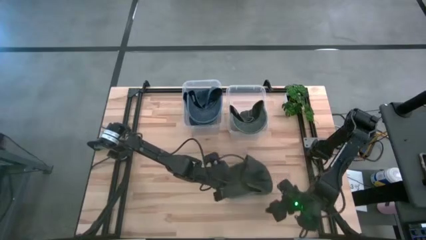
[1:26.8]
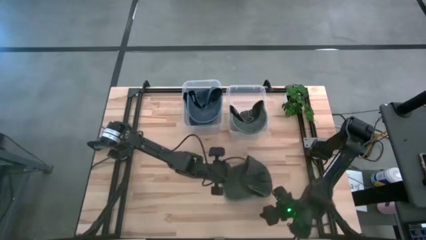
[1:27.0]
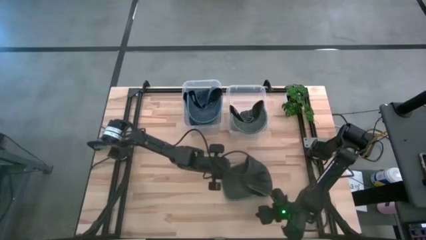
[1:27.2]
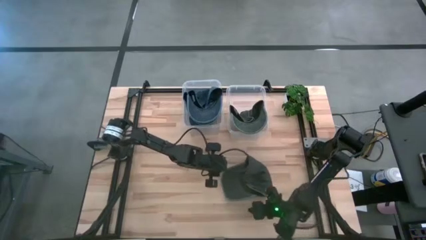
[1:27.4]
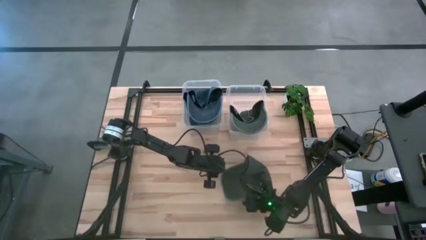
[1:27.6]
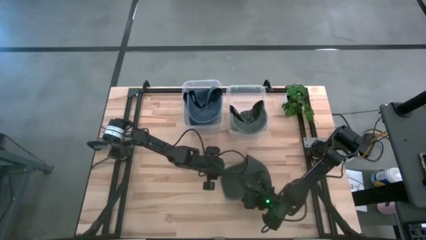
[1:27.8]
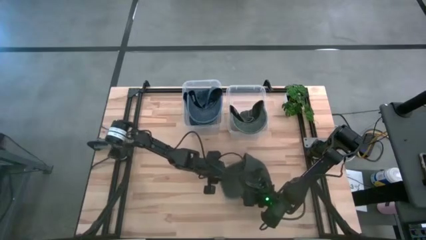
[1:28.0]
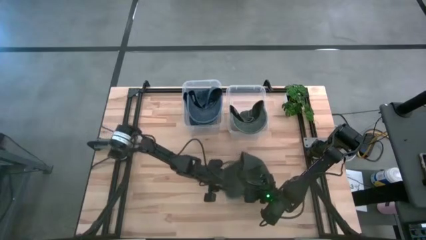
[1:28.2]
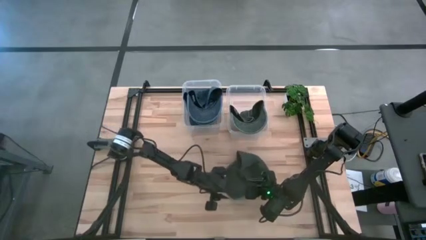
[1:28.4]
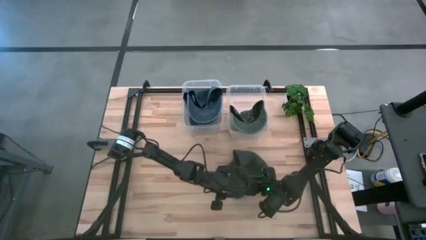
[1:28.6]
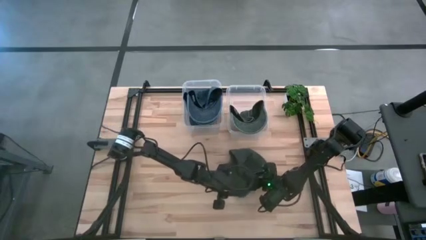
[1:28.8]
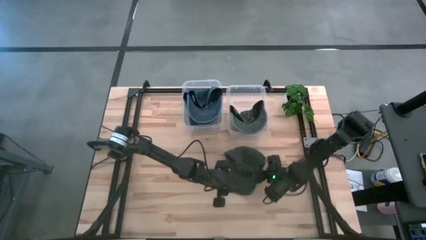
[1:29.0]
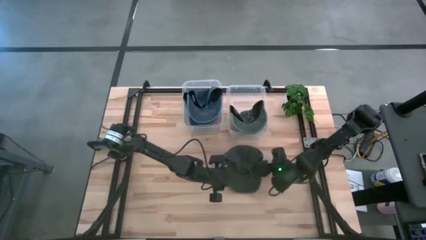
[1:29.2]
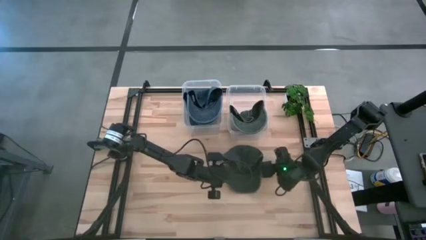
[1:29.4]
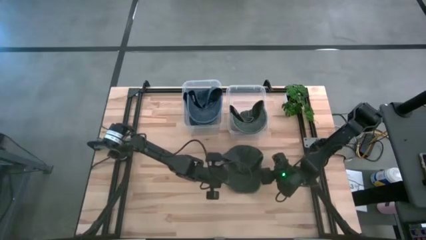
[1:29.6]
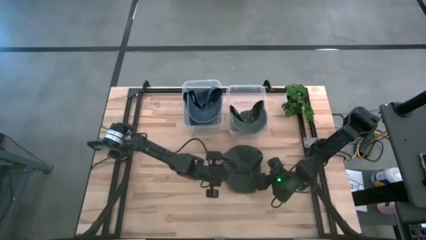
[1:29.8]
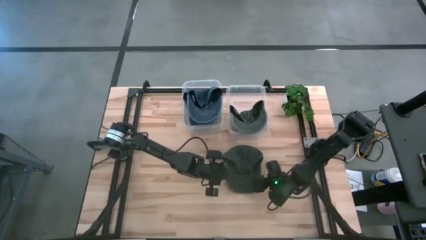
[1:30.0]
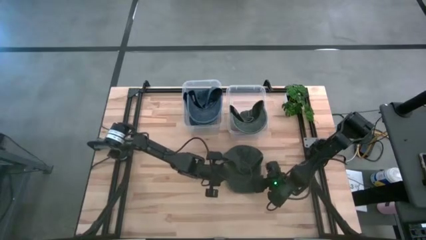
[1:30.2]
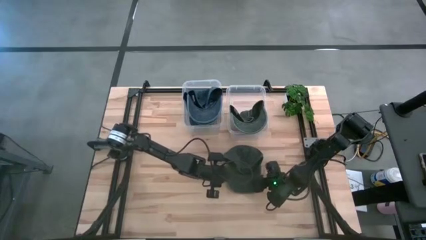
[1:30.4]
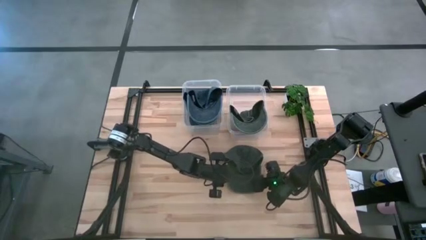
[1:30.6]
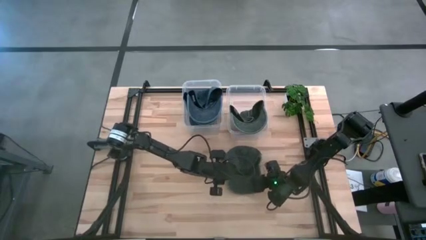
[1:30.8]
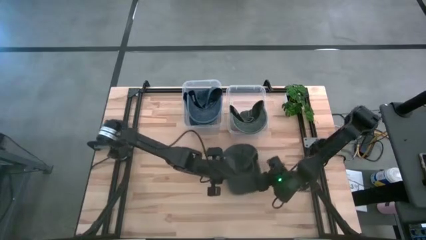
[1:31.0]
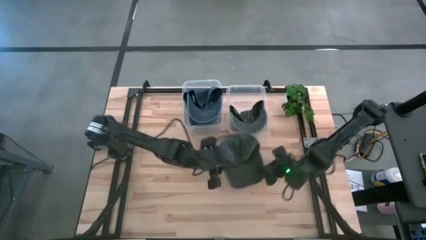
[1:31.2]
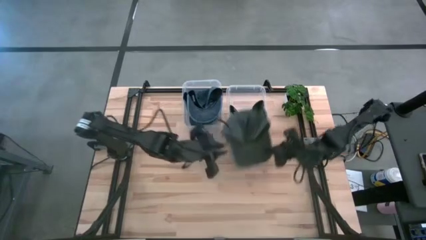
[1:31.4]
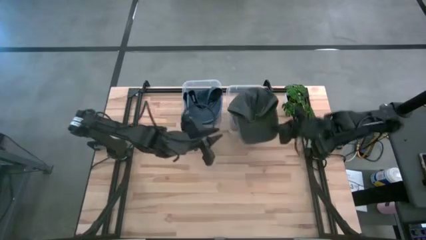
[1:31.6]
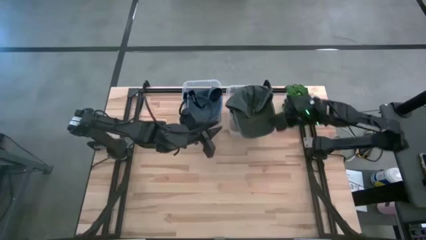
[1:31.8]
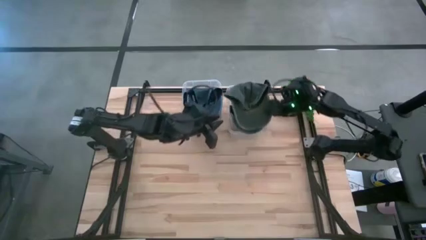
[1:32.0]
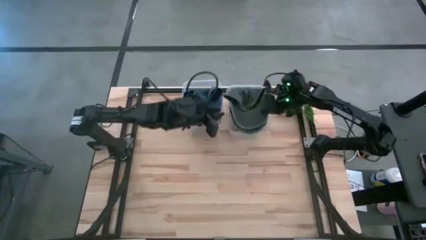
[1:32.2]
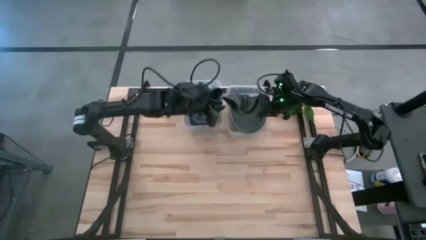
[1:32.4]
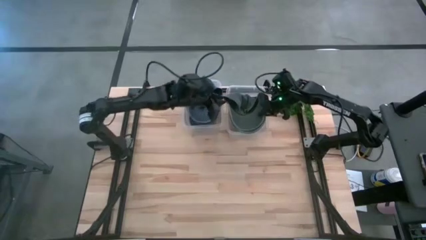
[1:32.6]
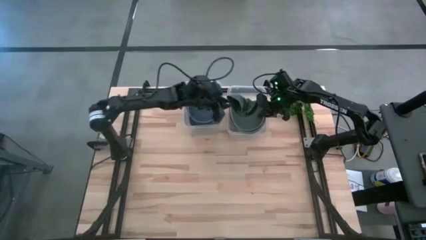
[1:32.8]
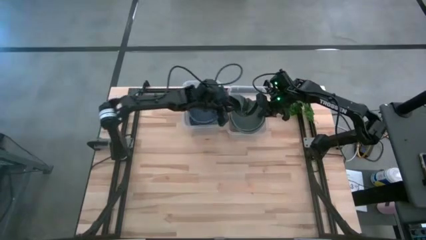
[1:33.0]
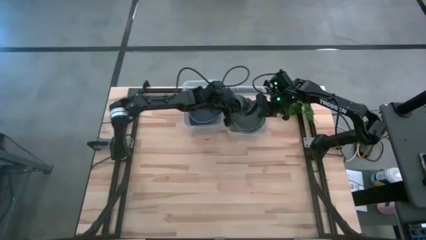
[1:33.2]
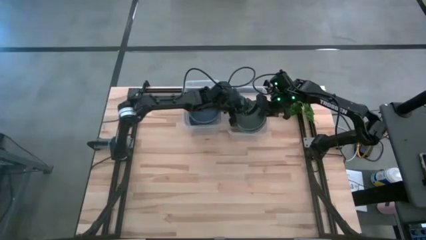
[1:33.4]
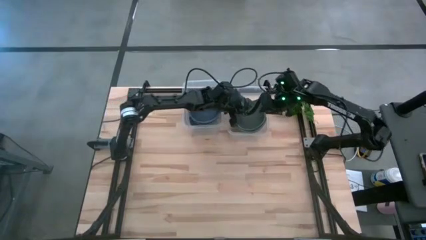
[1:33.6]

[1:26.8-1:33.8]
Task: Pick & Place hat
Put the black cap into the right transparent bin

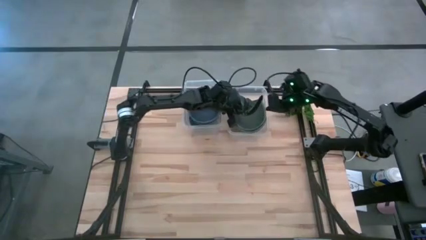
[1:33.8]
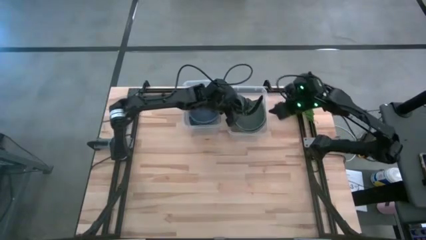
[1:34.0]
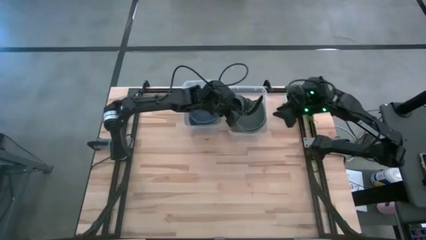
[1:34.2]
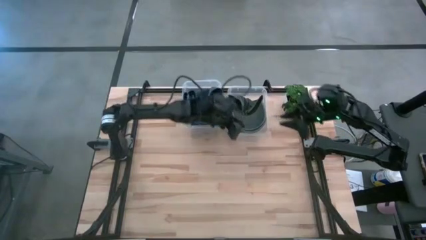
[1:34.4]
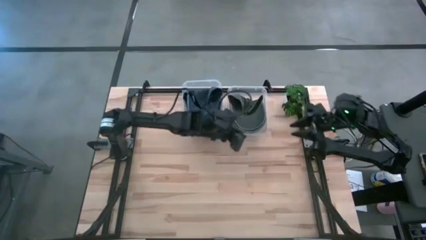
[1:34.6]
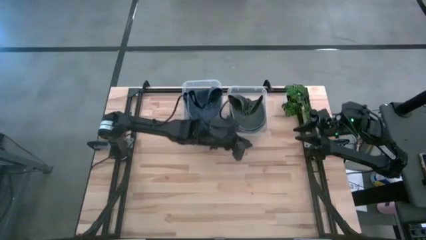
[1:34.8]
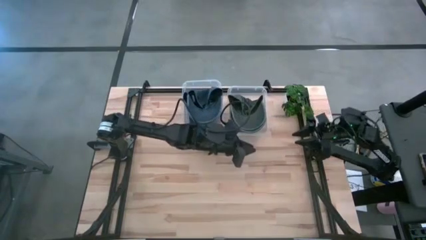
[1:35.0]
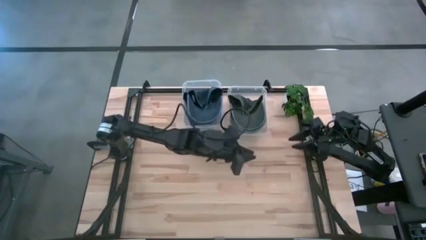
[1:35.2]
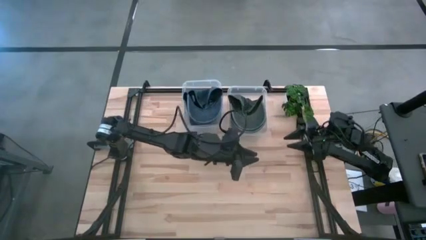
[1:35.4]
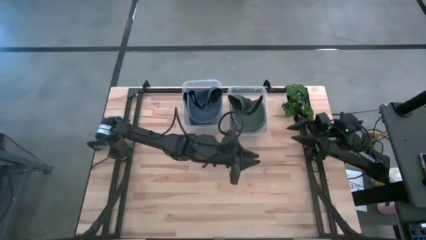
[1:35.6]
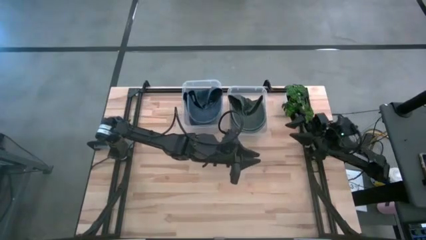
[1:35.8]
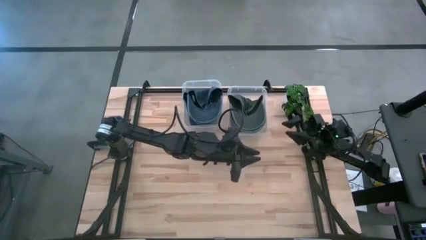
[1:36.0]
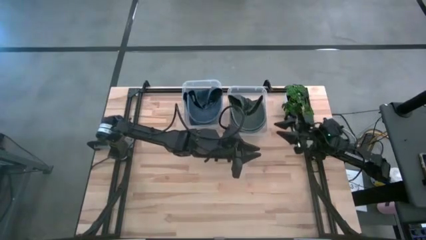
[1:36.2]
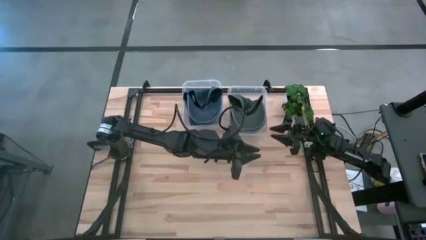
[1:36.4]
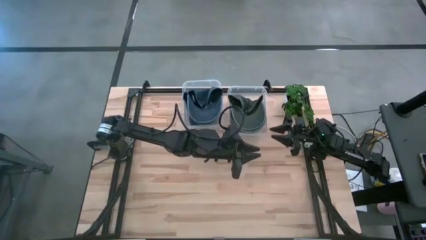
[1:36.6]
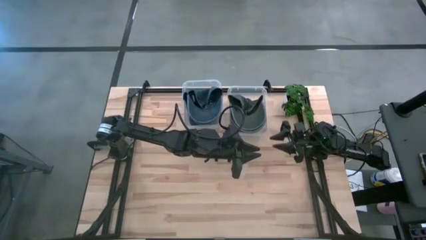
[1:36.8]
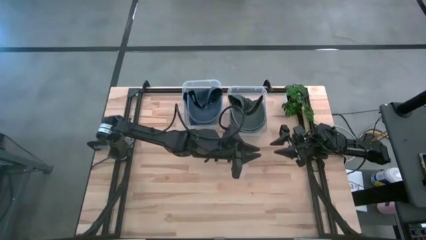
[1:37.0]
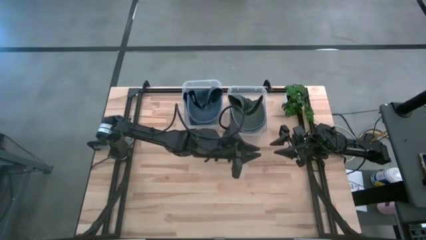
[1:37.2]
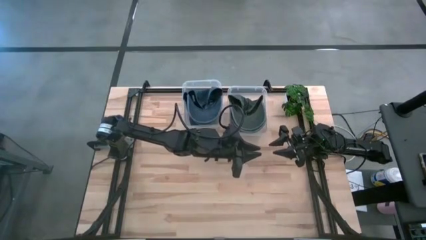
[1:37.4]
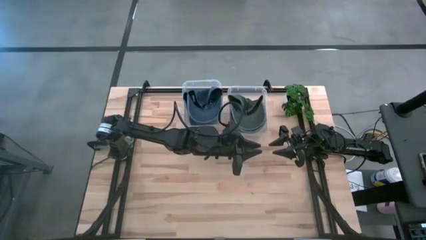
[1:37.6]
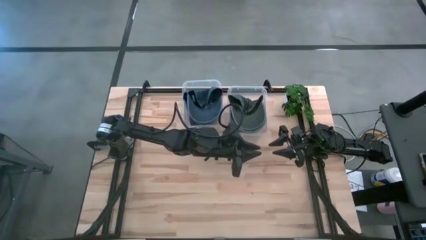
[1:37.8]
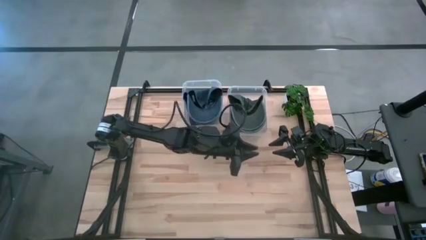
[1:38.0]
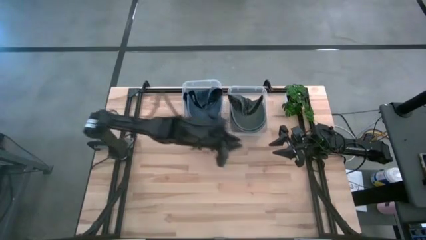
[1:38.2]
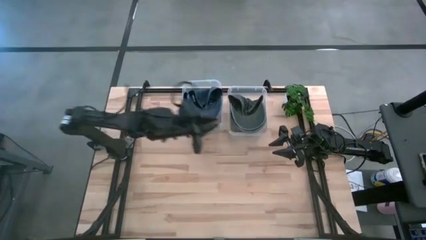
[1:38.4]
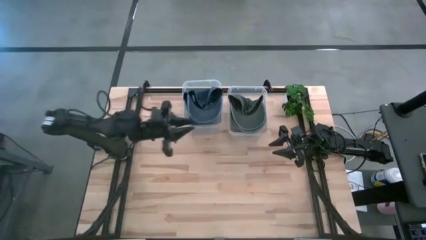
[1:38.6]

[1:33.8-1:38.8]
Return to Home Position

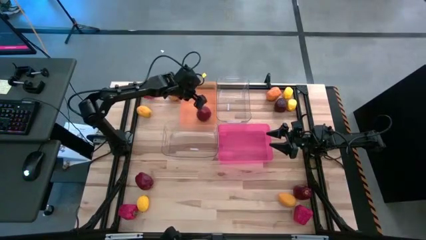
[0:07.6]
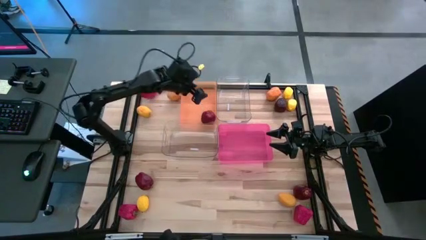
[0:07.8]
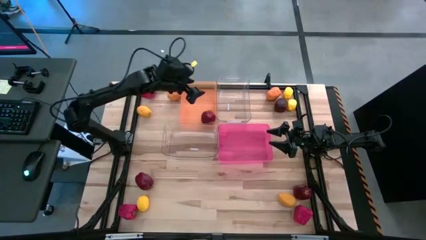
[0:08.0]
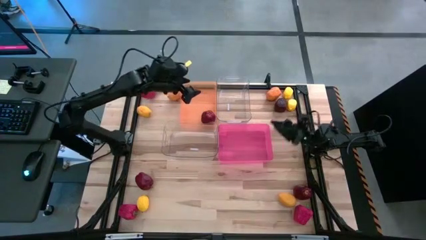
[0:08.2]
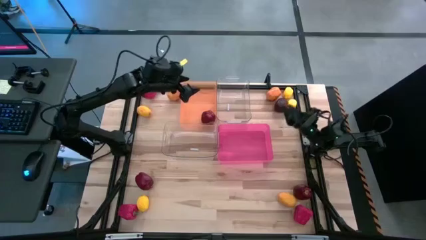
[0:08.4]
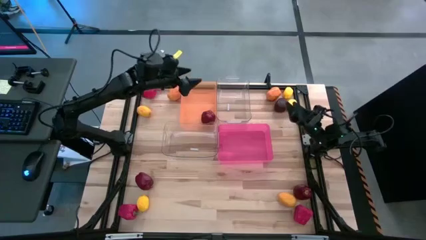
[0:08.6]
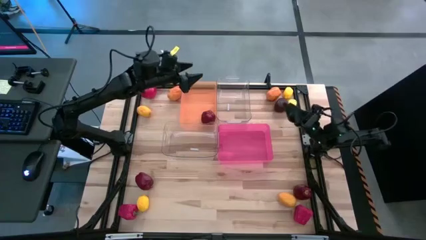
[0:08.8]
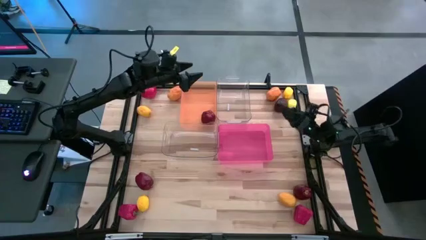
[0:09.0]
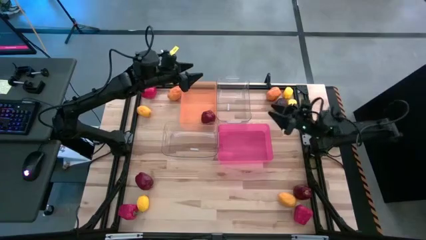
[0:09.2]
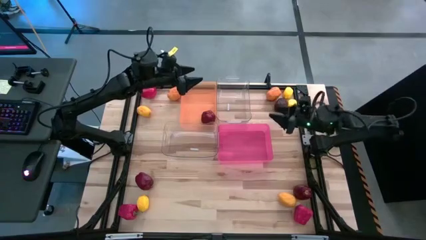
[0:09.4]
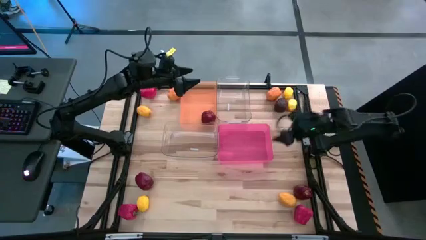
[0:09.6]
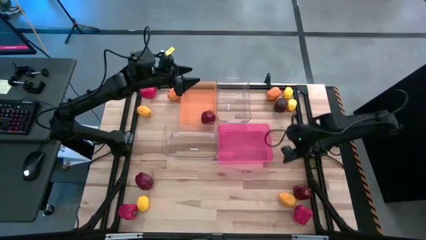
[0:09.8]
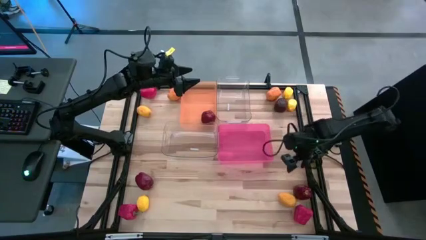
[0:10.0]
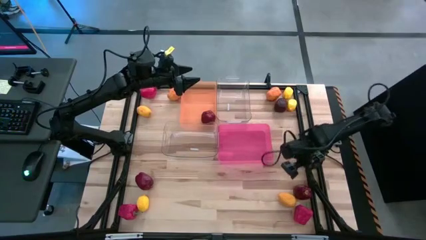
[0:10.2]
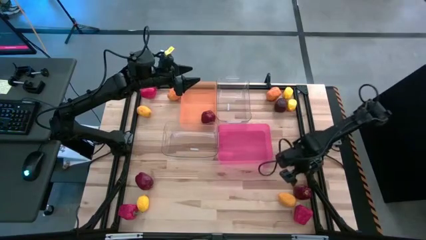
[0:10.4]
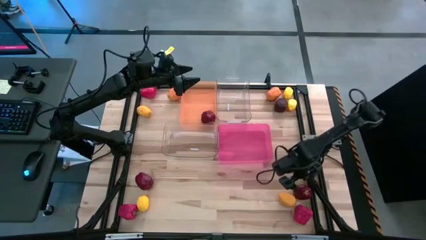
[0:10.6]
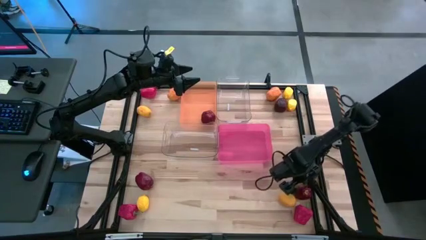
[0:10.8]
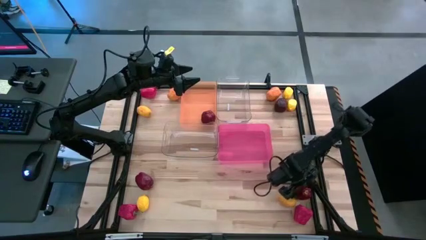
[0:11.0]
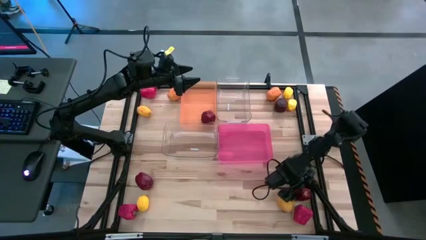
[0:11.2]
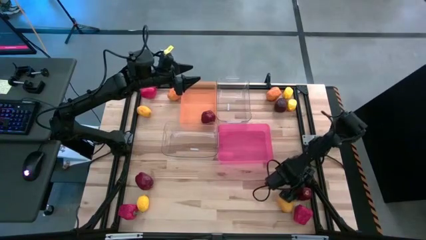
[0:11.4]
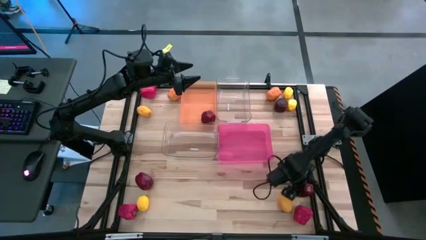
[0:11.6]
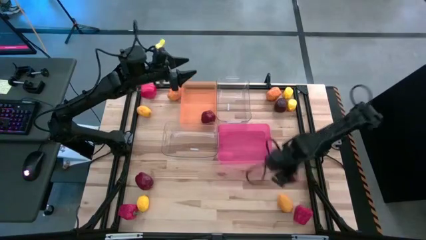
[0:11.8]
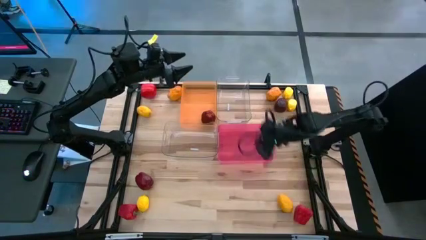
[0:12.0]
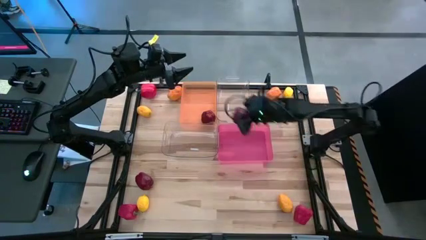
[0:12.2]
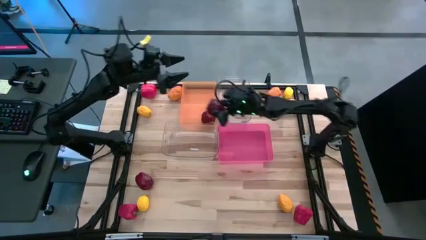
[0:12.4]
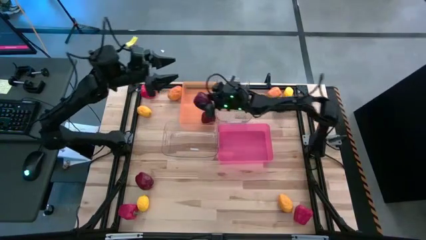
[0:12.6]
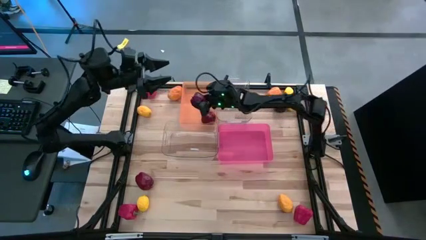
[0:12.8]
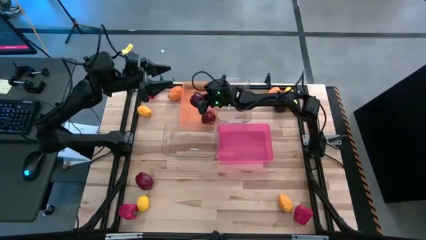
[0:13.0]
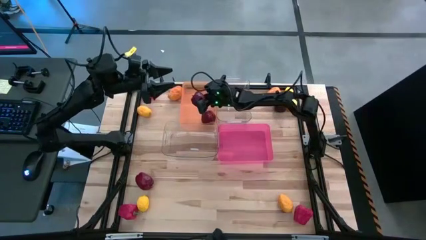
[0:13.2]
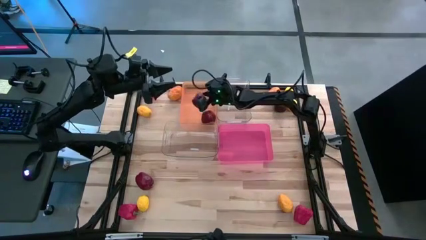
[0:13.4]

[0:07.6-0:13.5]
Task: Sort produce into baskets
Put the red apple into the orange bin
